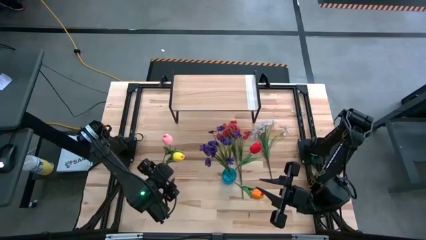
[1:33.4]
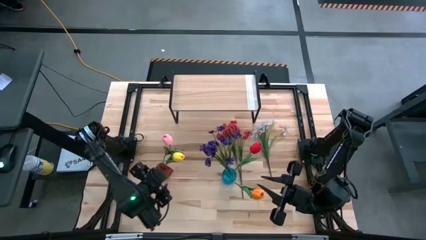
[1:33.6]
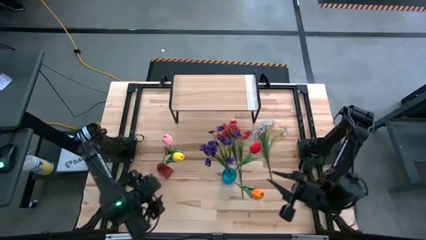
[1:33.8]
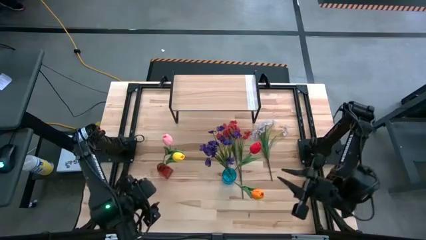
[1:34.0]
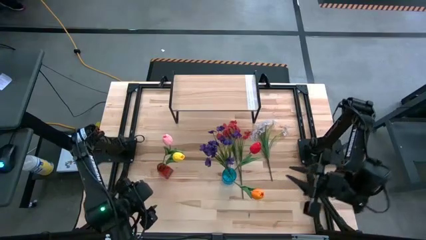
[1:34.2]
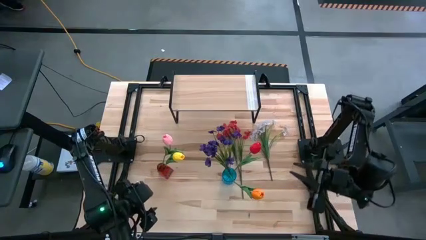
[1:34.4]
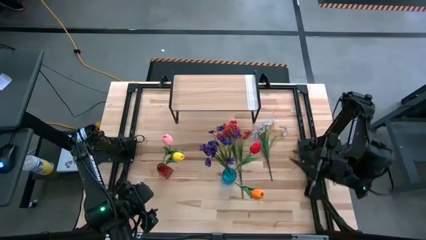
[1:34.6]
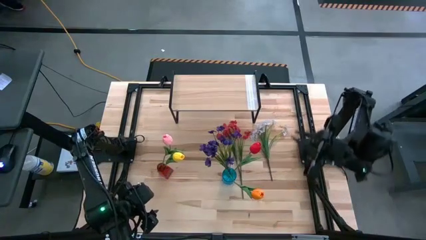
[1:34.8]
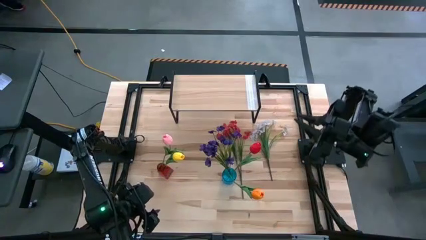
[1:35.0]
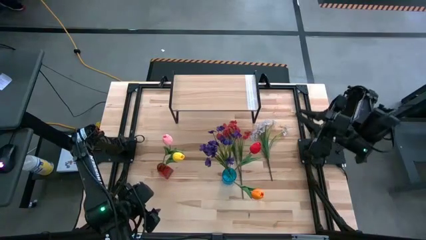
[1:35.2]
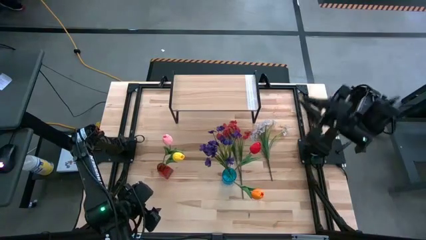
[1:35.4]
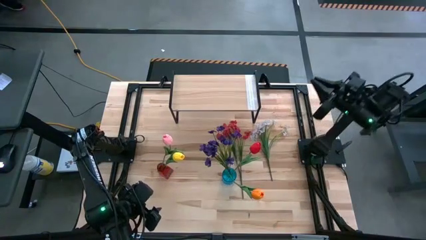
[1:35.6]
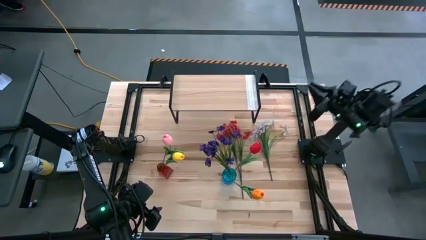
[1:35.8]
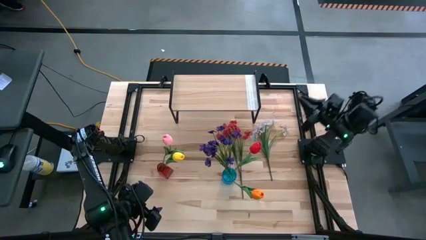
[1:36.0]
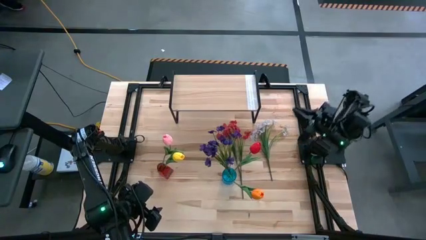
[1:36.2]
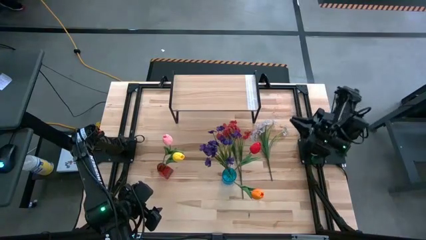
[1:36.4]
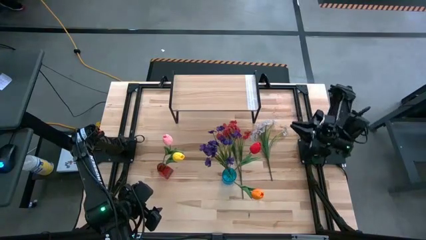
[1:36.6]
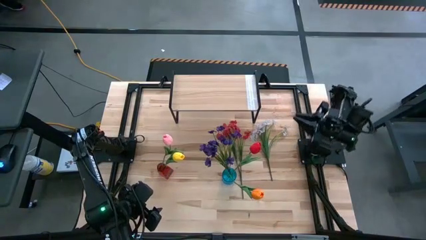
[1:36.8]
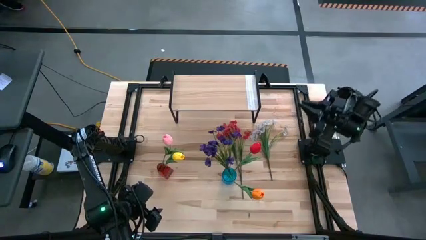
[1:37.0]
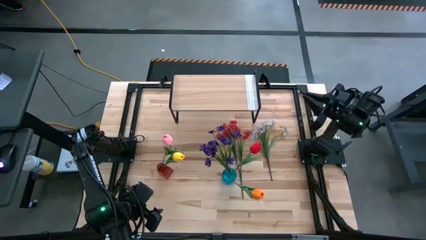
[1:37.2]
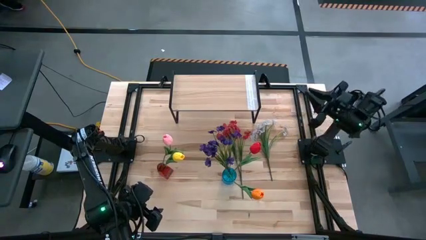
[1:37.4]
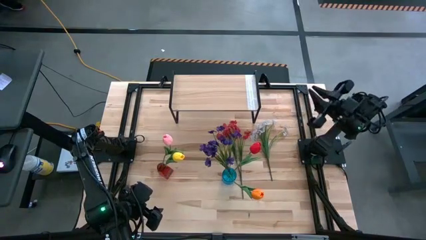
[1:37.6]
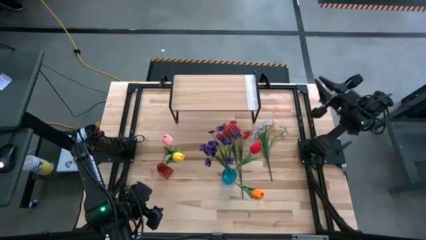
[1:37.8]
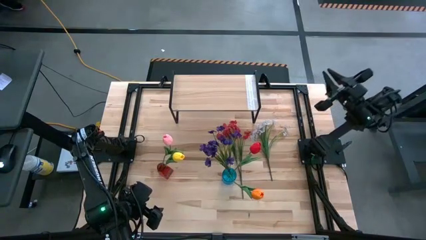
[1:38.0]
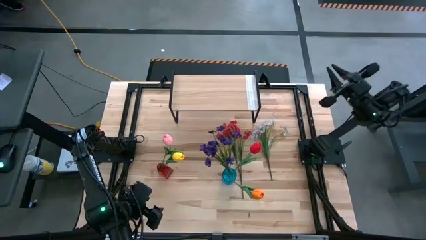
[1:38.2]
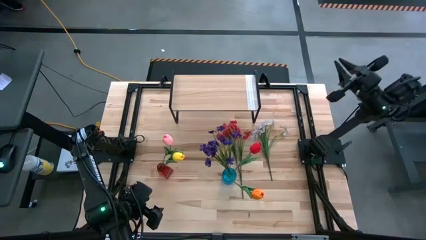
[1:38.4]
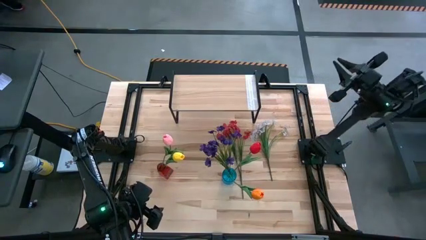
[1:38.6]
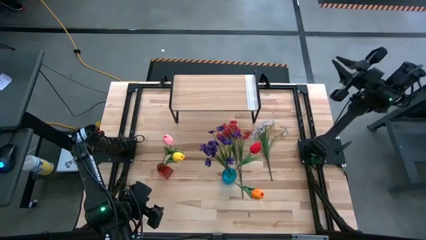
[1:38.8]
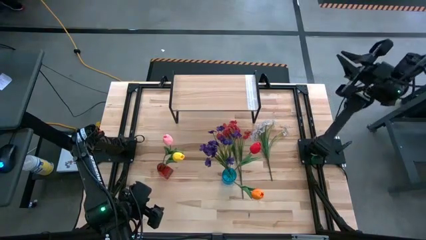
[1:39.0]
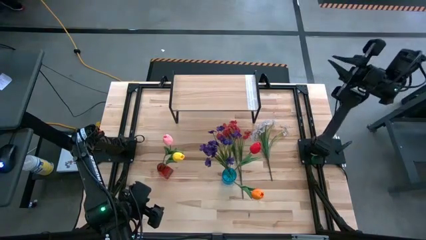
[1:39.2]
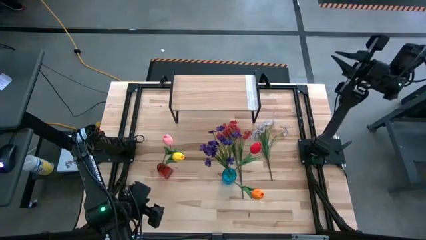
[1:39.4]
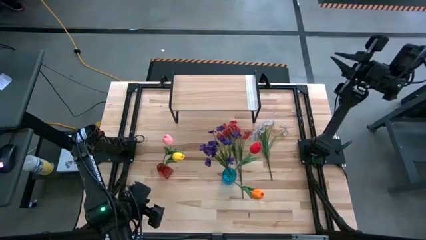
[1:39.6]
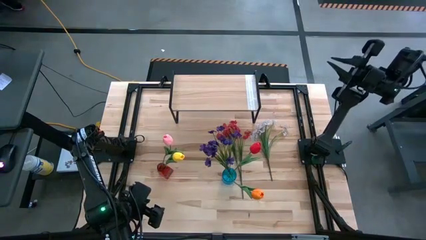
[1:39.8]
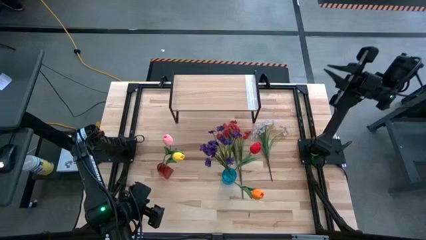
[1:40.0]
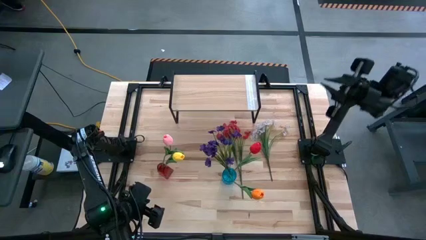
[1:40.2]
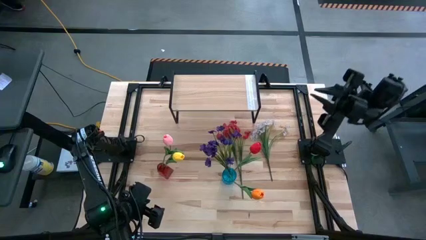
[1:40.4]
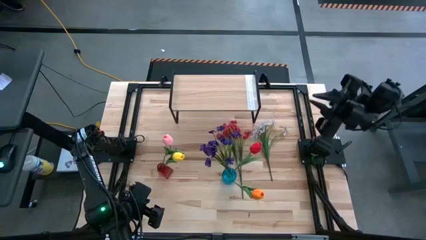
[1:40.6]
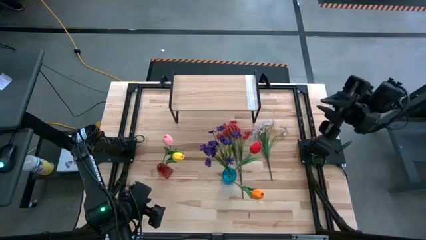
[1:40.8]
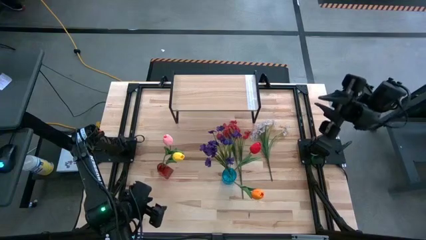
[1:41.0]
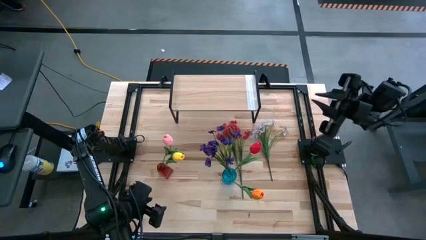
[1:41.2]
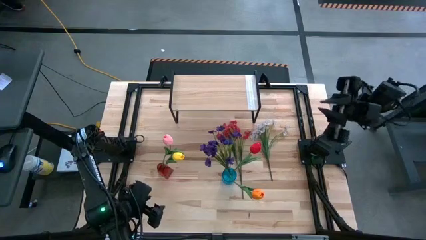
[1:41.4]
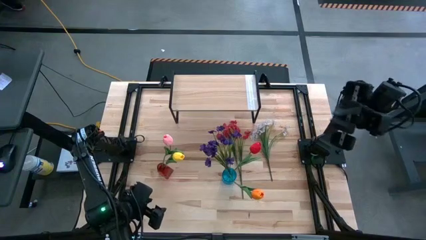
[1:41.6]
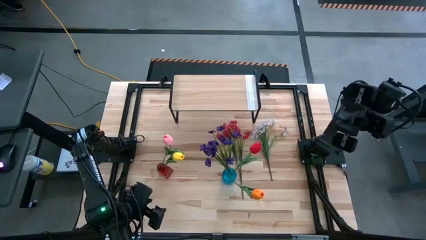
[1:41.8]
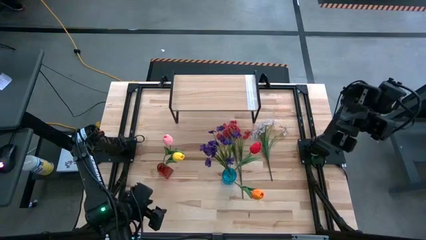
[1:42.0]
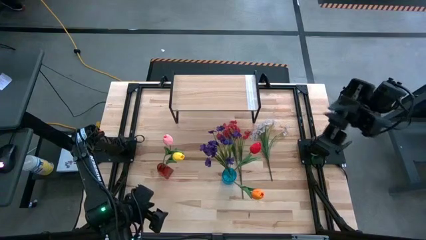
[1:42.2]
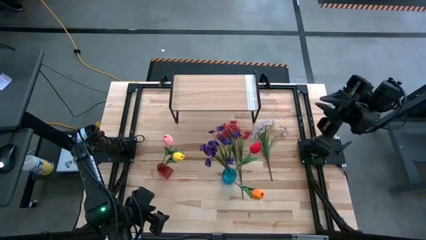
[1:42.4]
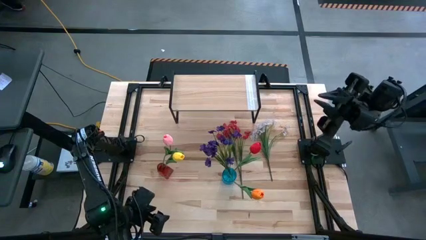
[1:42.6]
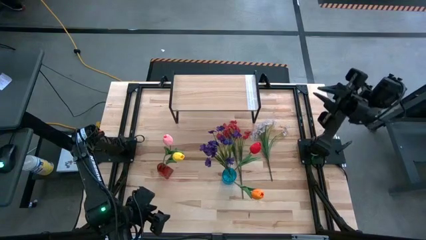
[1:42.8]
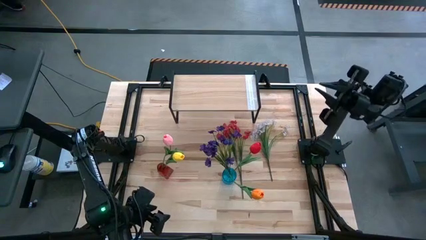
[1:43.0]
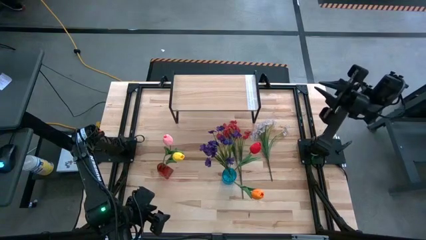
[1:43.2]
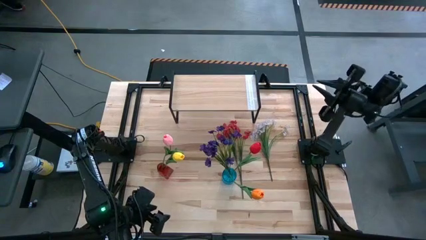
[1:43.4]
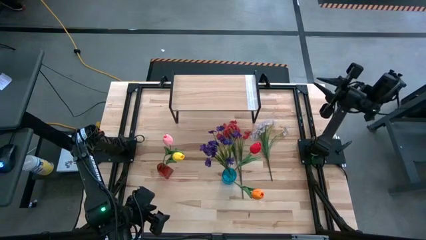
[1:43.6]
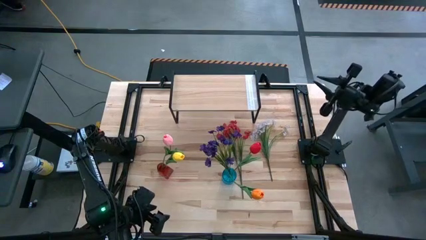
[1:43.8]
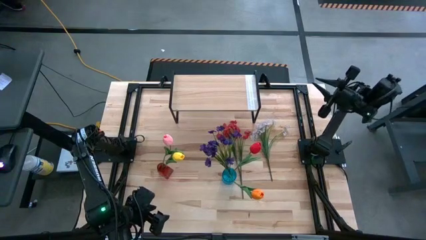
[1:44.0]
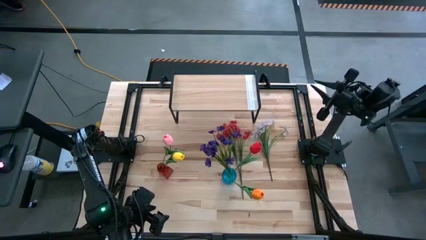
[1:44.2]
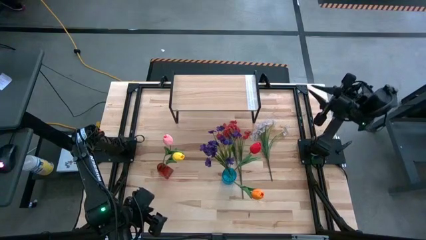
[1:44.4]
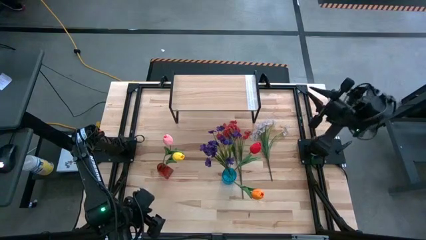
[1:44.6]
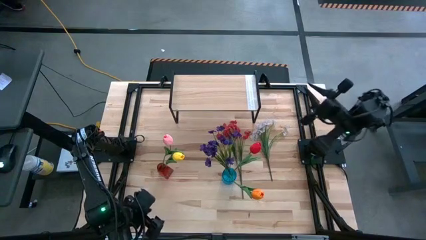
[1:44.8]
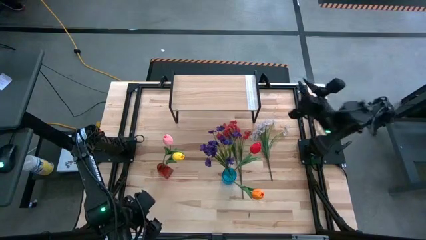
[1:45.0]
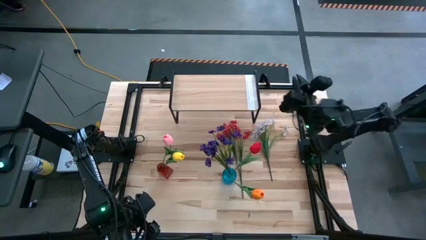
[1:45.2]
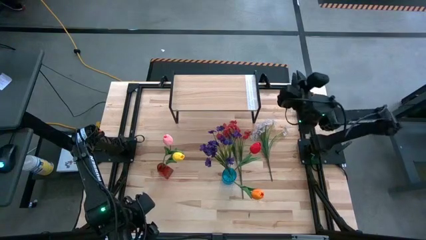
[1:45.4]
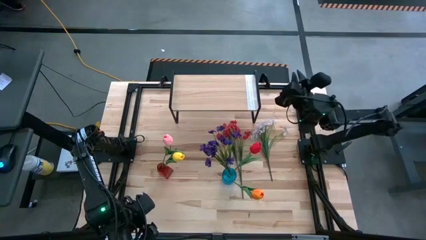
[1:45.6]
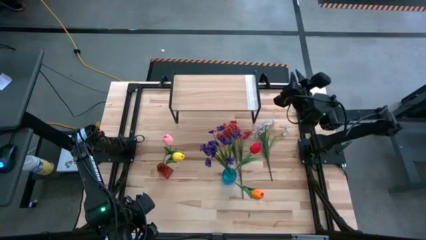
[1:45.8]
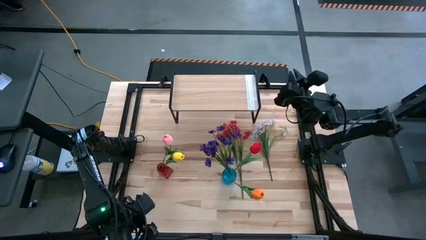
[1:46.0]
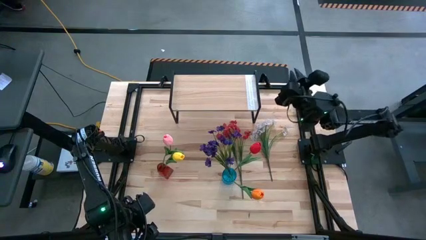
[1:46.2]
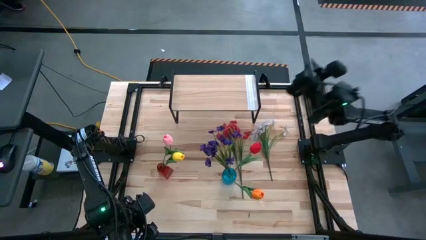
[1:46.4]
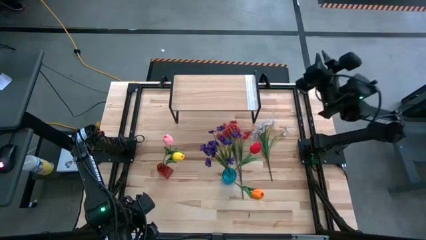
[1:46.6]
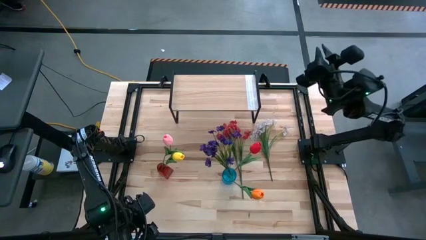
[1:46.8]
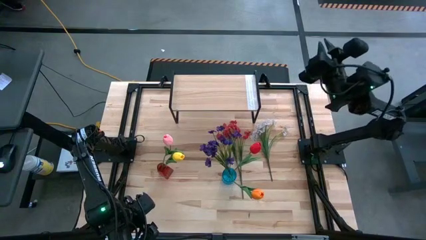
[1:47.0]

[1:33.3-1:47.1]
Task: Pick and place flowers into a vace then onto a shelf
Put the white flowers into the blue vase
